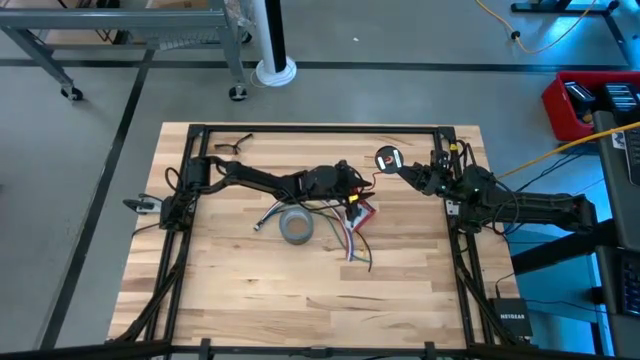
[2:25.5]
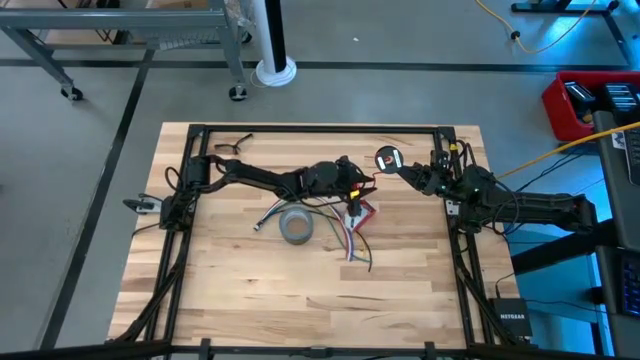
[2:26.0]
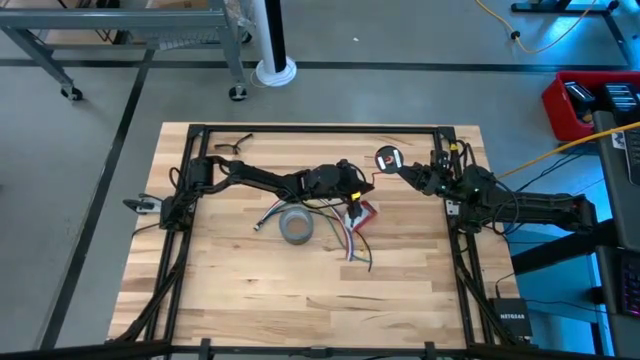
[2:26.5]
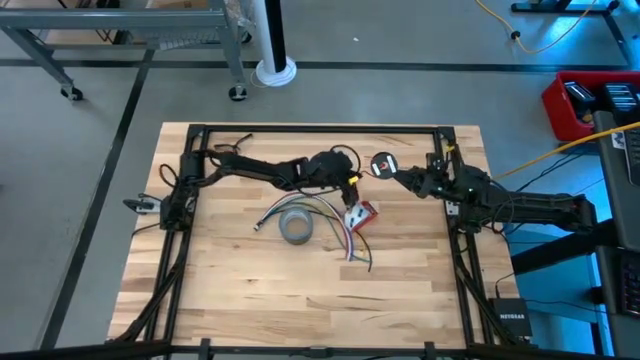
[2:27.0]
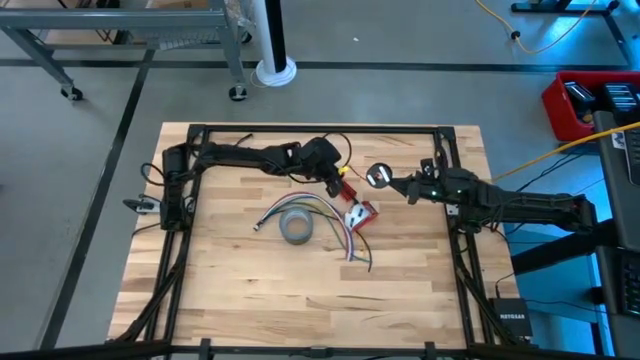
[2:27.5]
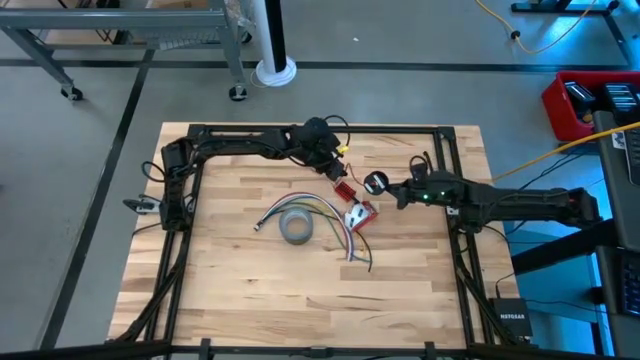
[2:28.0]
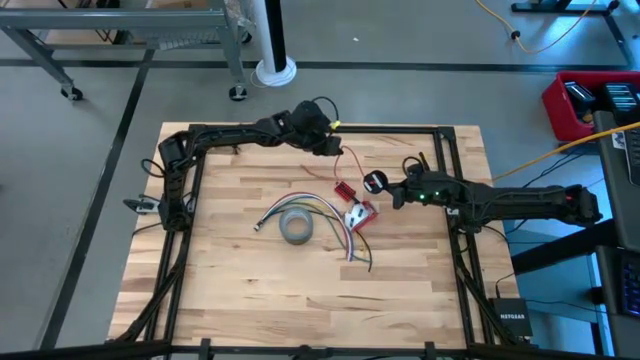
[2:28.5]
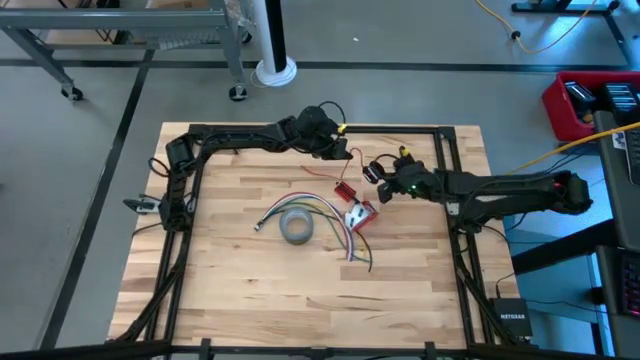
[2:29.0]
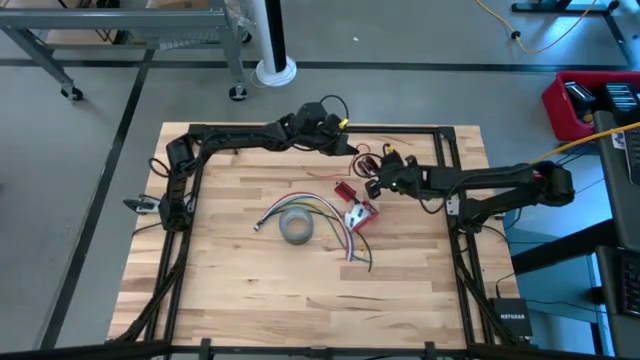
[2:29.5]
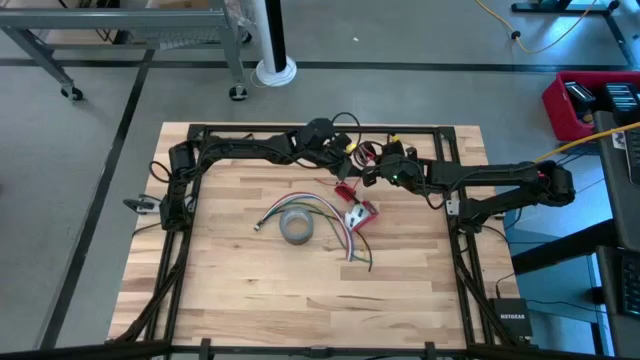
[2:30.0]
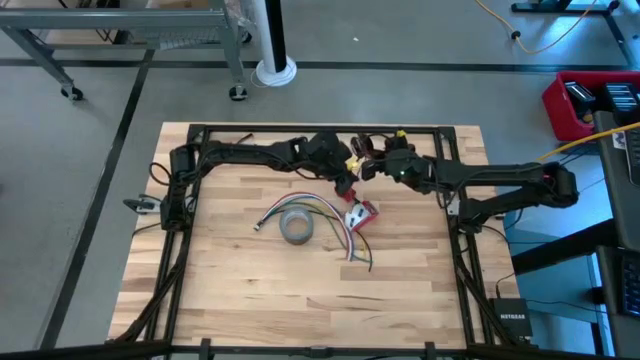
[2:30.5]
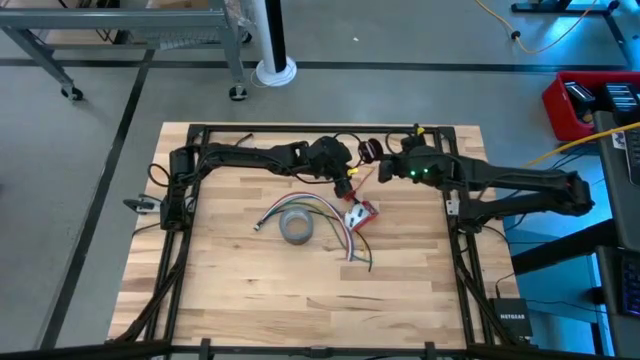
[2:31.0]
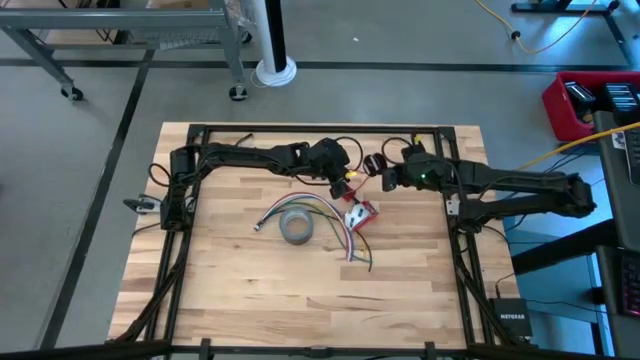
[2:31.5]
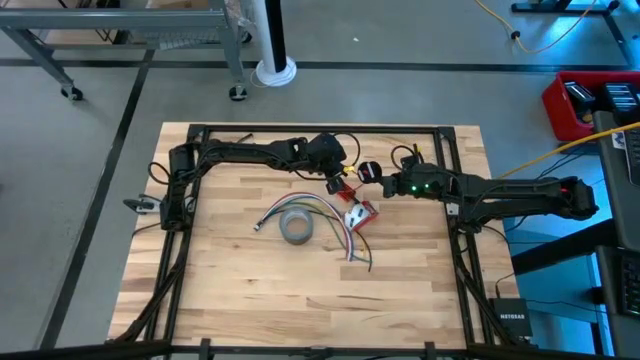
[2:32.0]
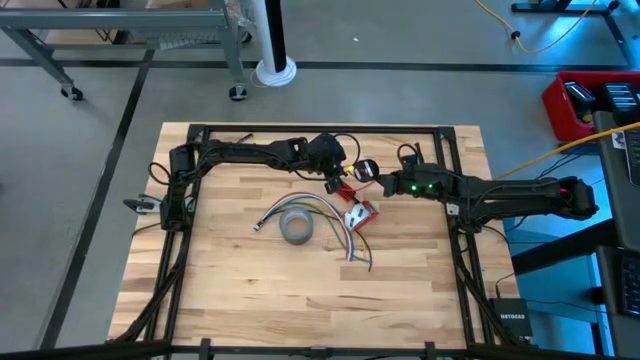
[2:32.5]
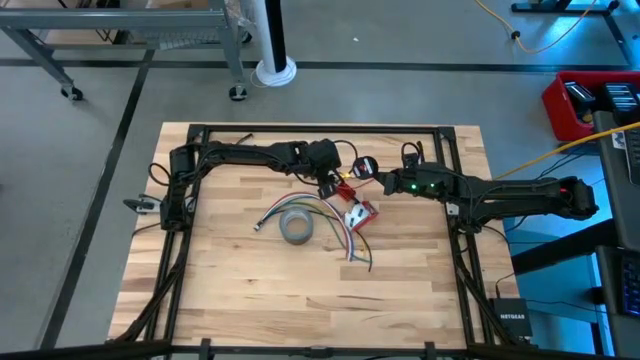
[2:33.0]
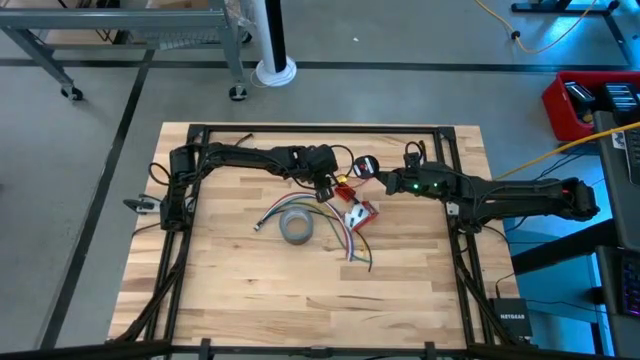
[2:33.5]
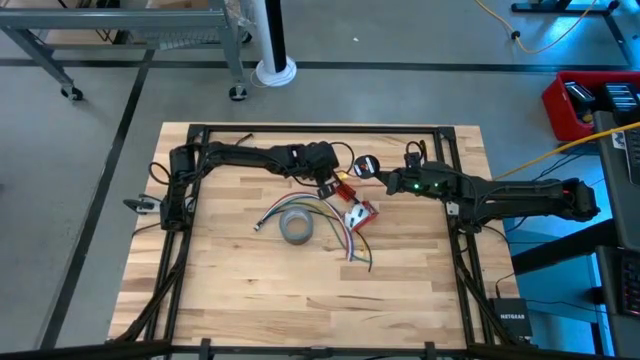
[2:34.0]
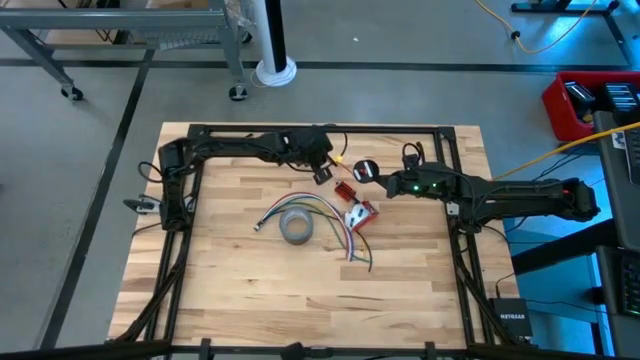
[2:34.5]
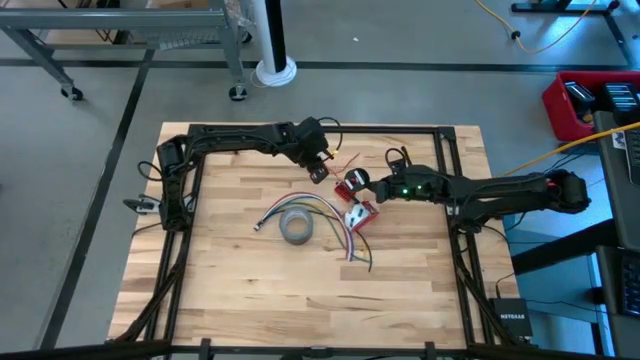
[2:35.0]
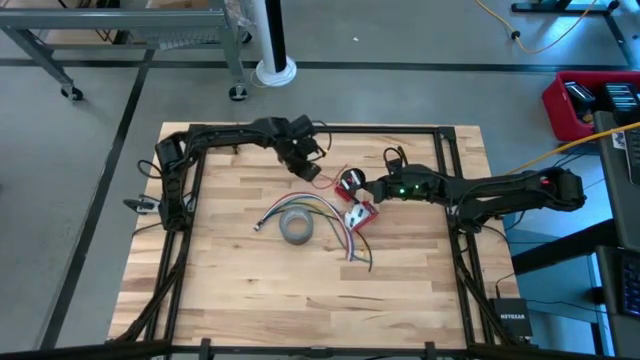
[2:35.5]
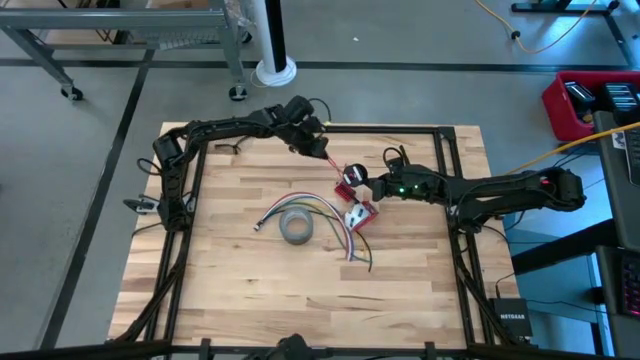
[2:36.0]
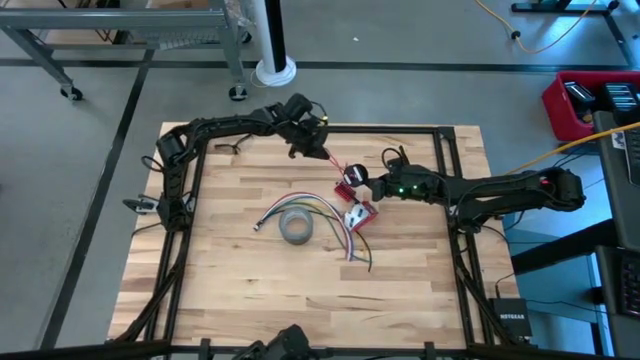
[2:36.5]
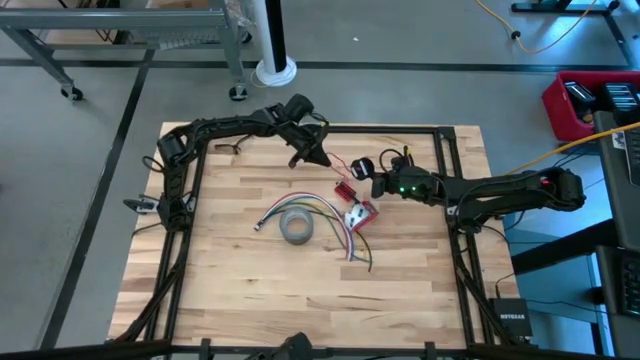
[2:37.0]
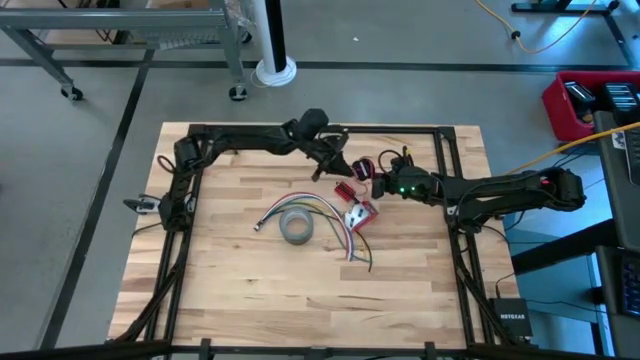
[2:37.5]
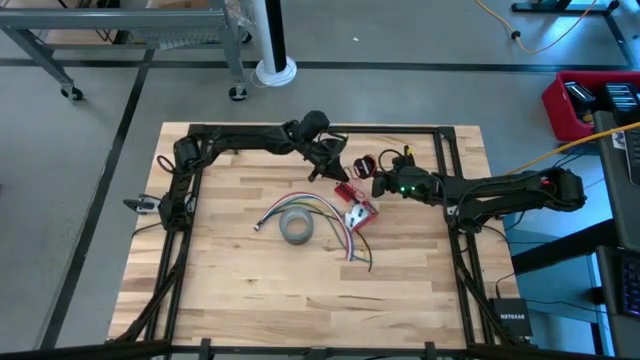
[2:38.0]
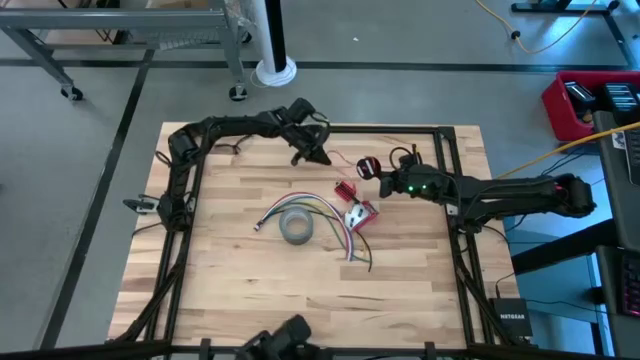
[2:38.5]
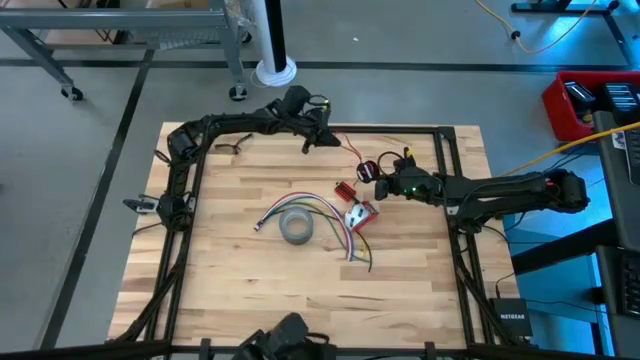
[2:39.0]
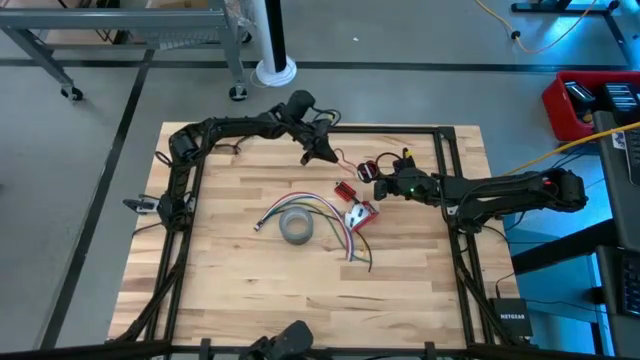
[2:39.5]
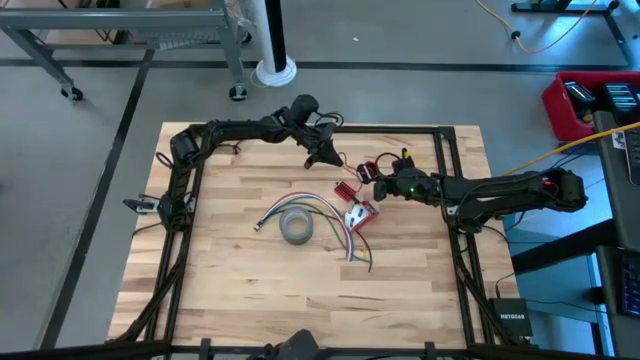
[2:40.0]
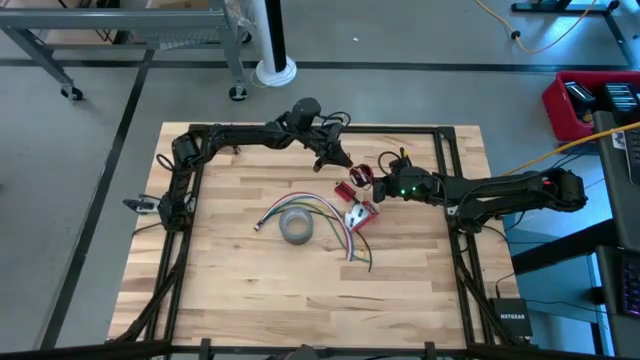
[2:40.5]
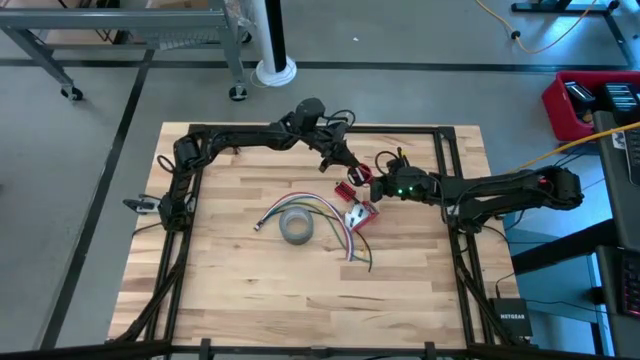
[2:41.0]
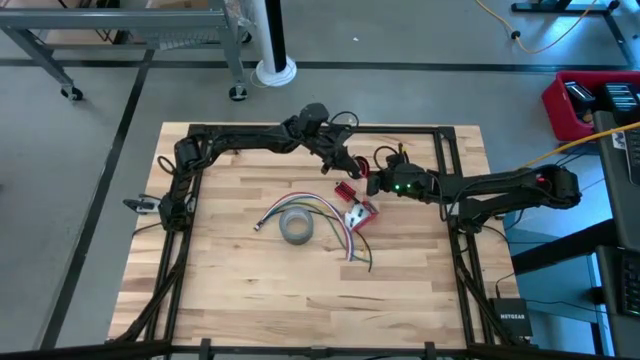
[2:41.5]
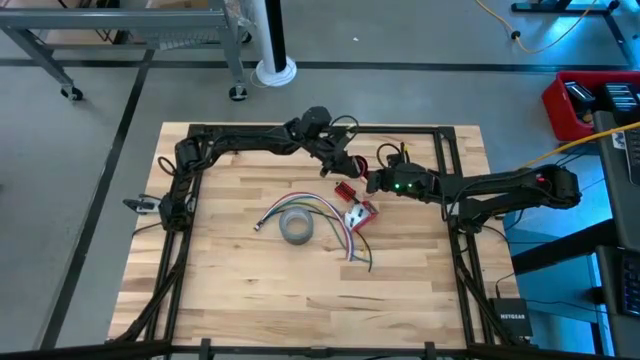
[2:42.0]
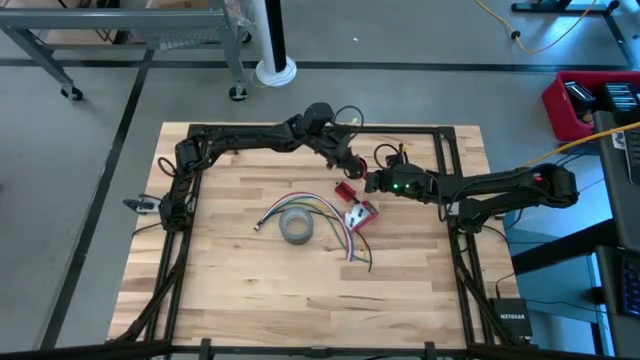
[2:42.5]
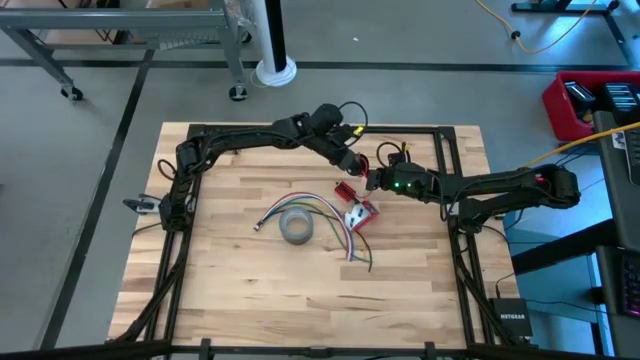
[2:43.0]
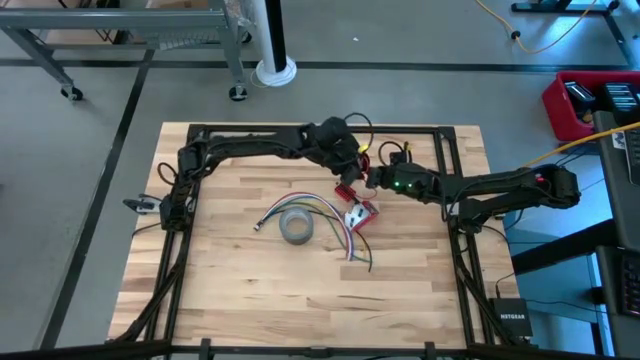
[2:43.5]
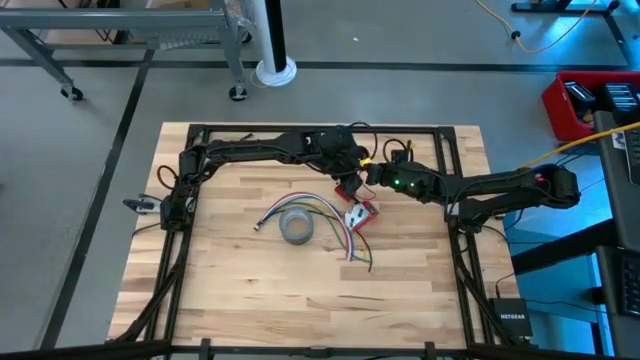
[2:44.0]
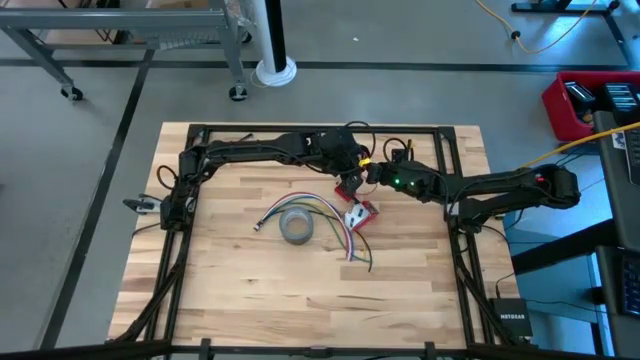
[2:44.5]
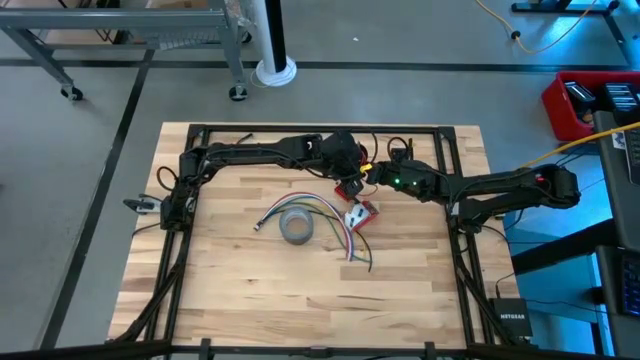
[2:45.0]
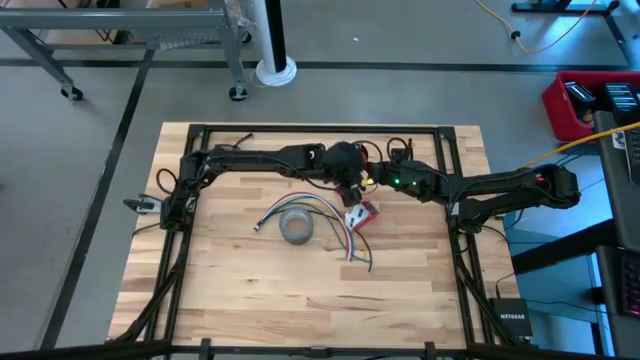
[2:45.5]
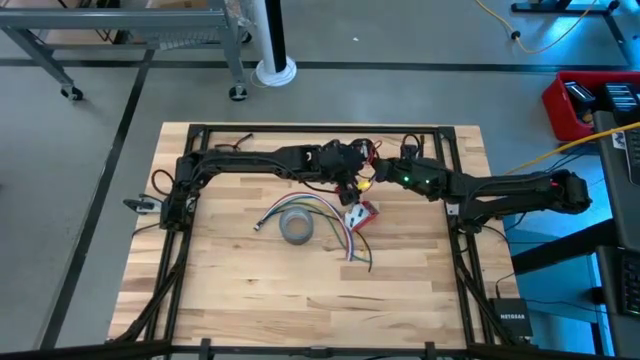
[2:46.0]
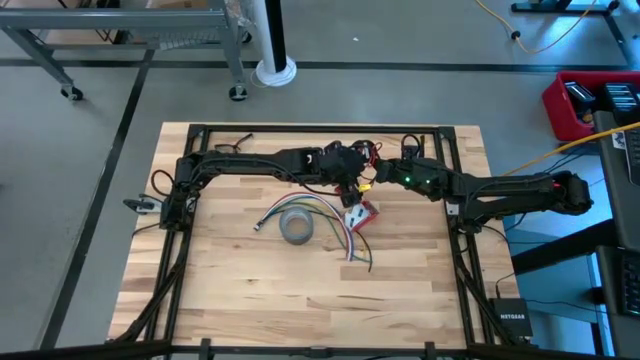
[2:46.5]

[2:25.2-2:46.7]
Task: Coil cords
Coil the red wire on the black spool
